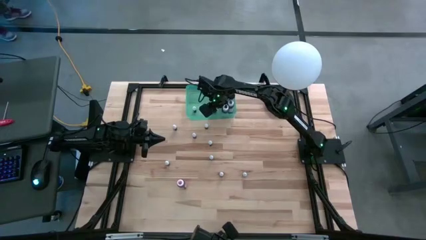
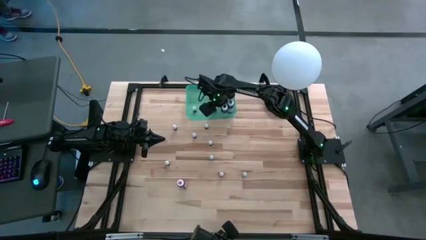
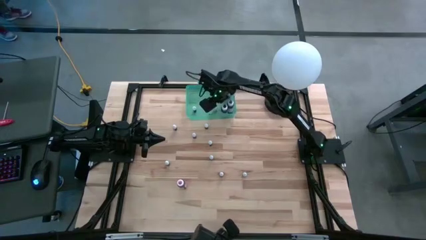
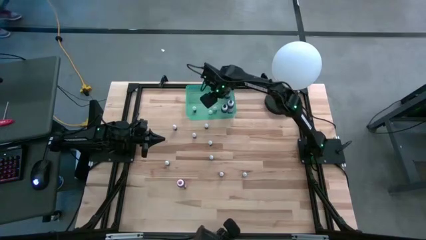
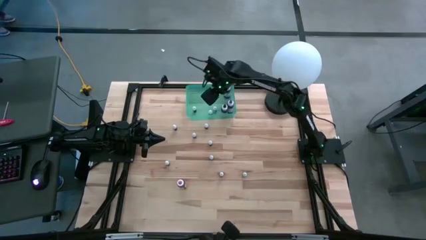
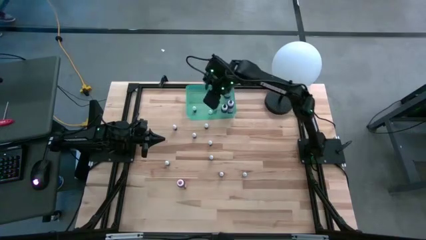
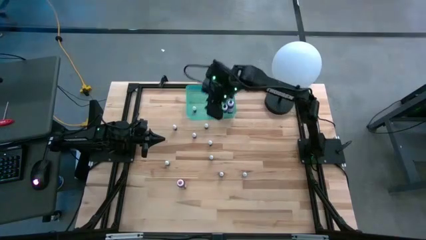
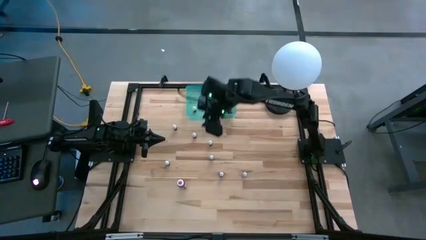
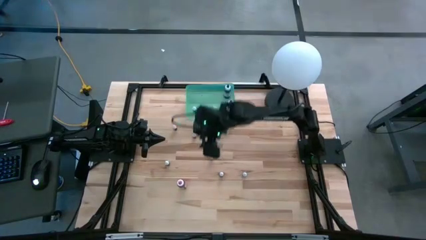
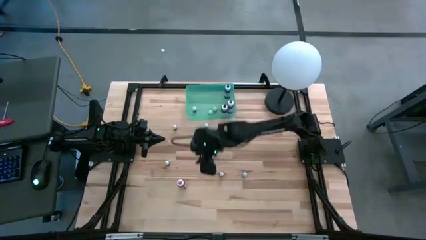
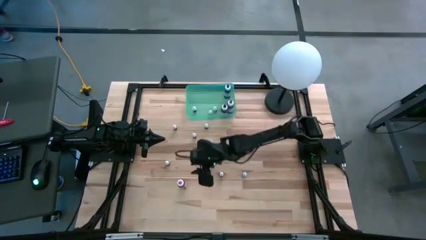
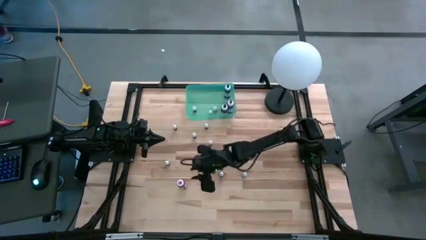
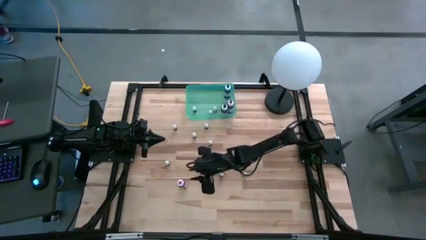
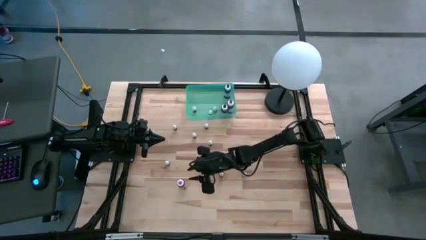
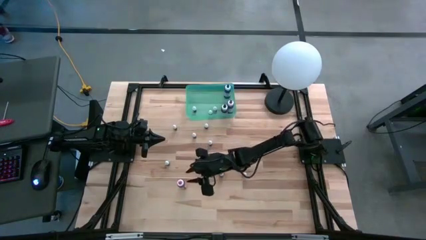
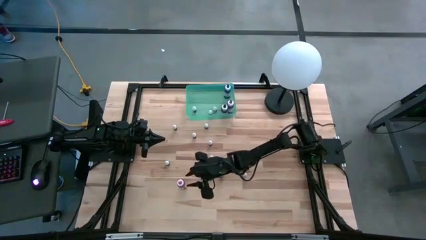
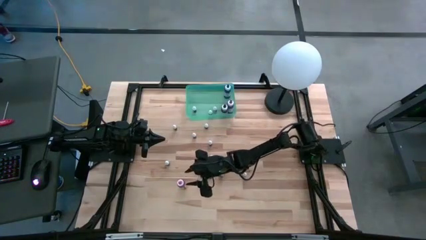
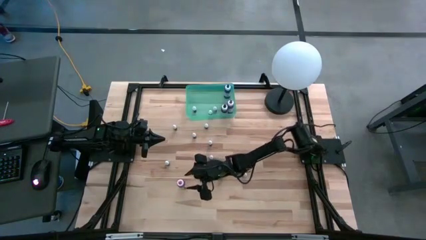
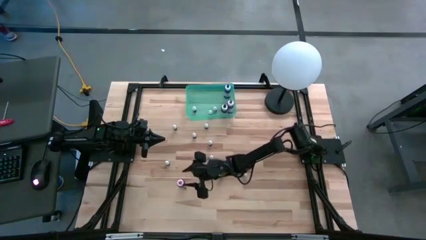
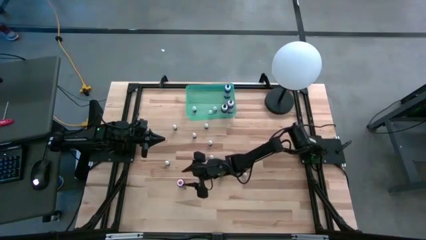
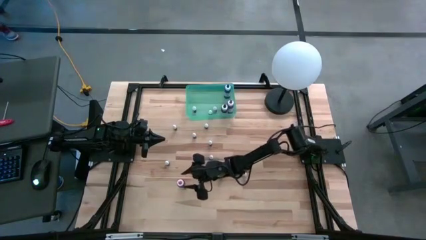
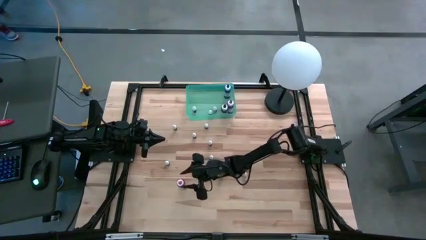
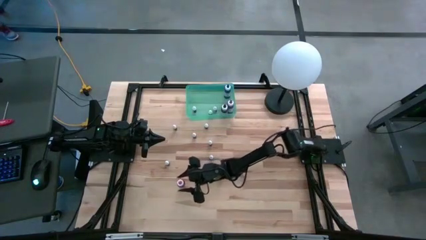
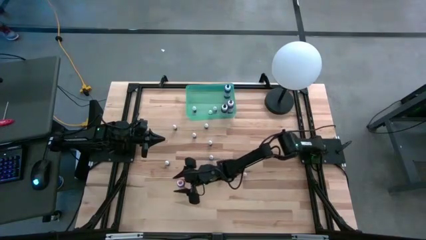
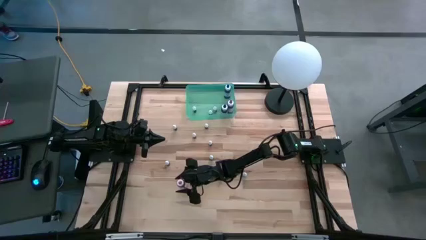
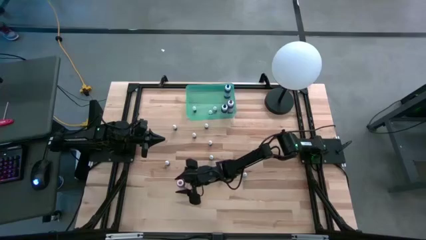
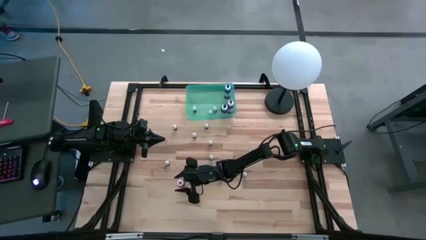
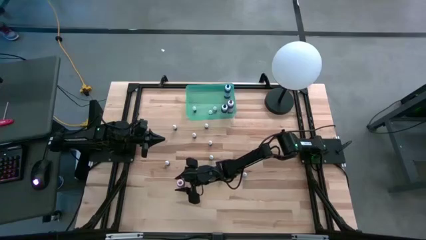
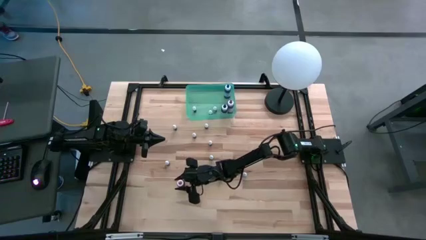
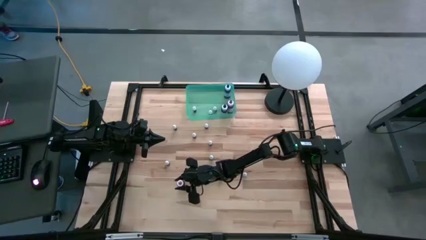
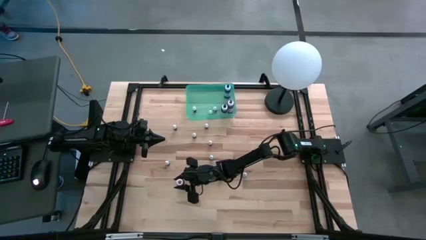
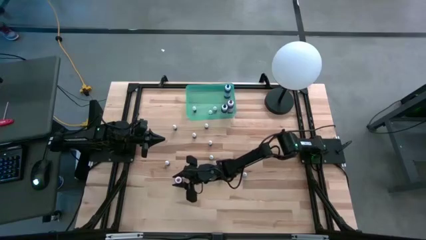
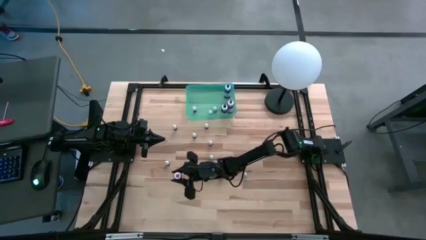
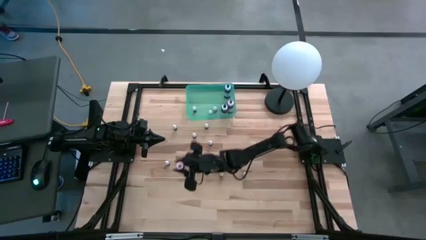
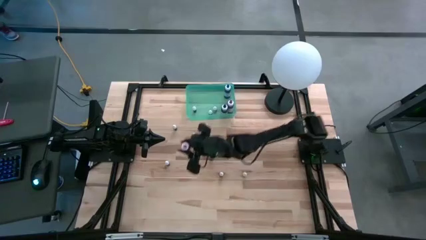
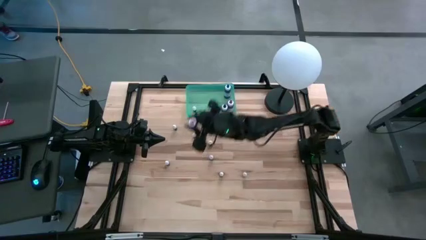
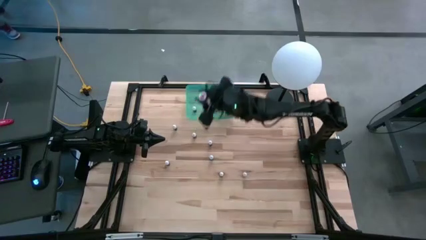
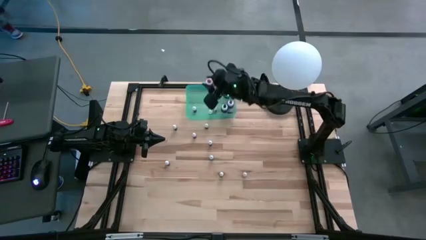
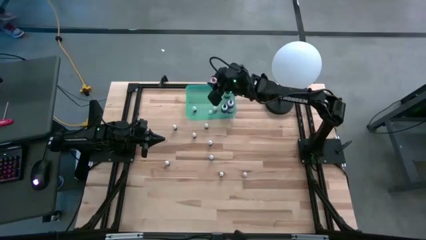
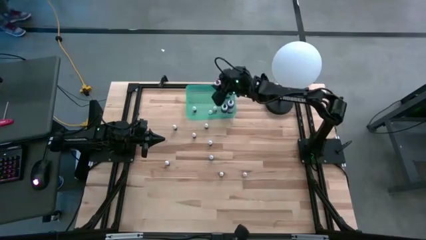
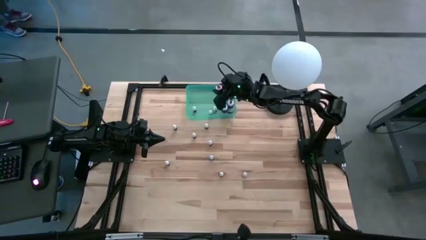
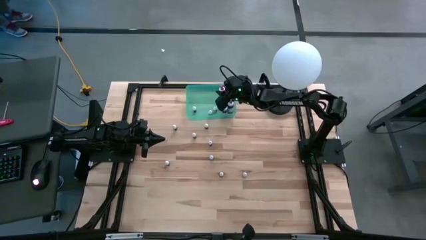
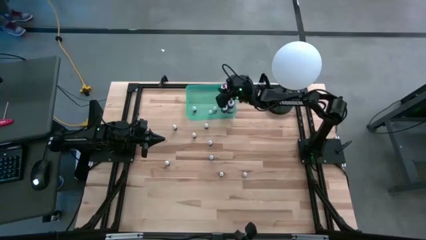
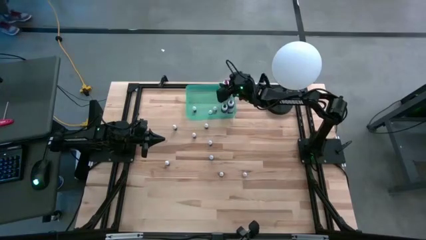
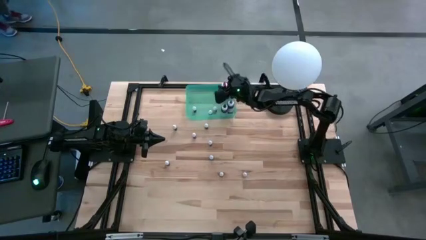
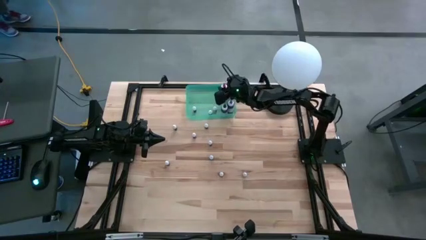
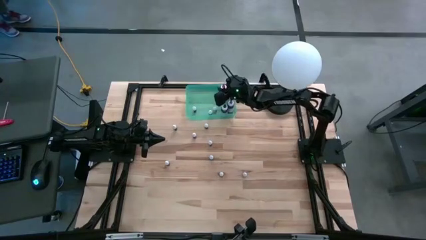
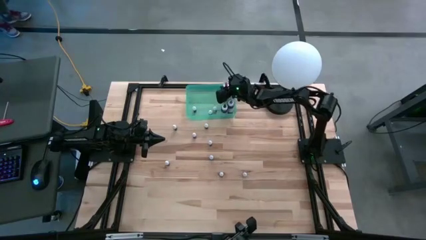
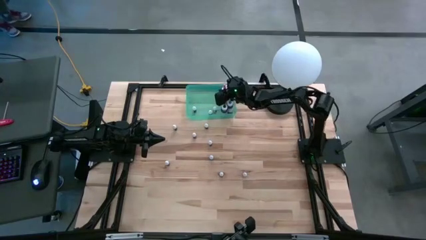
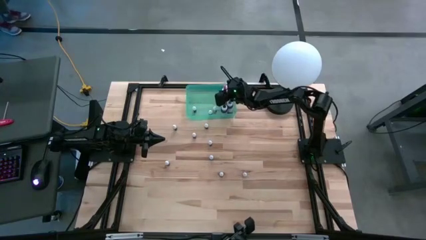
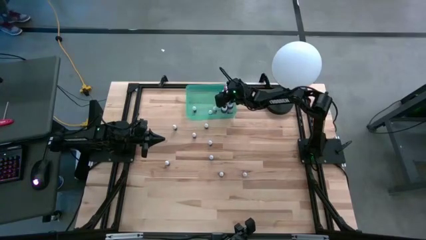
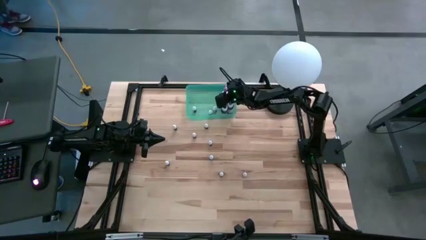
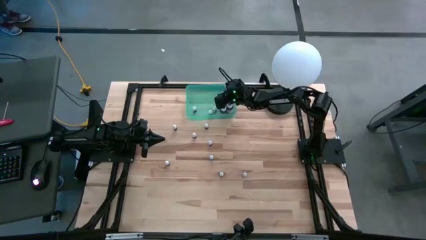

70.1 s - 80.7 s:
Task: Pick & Place food coloring
Put the large red food coloring into the bin
